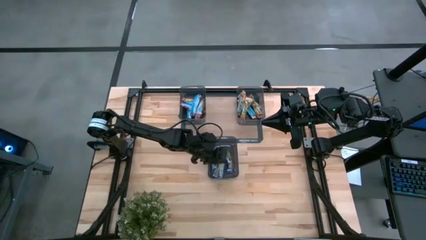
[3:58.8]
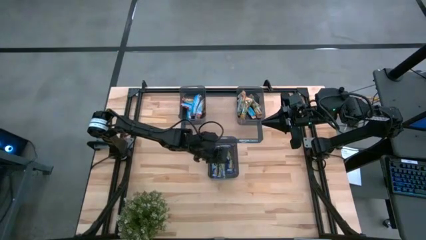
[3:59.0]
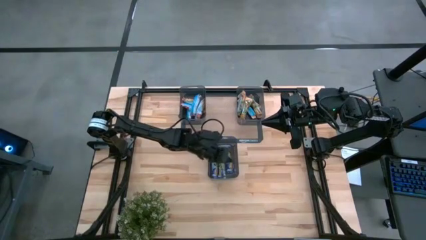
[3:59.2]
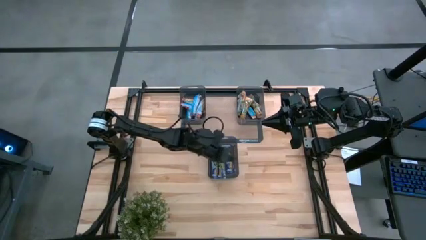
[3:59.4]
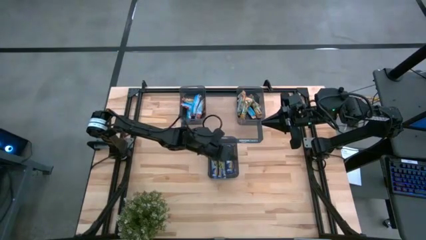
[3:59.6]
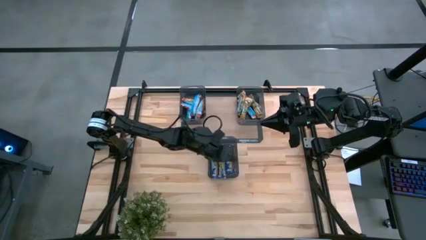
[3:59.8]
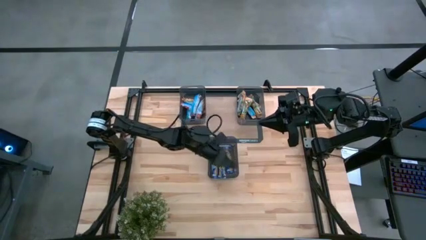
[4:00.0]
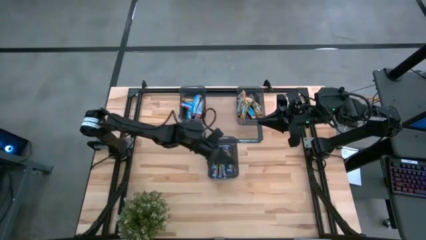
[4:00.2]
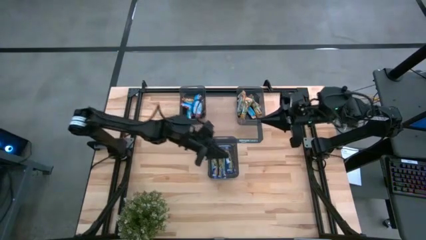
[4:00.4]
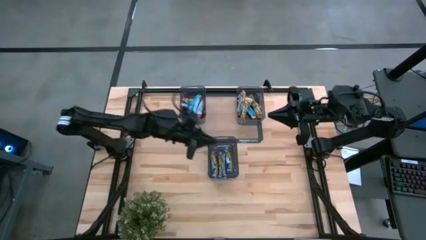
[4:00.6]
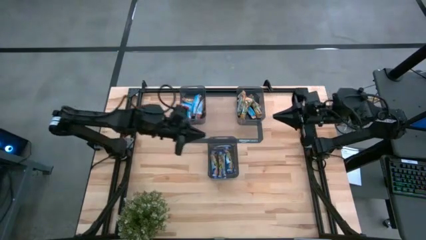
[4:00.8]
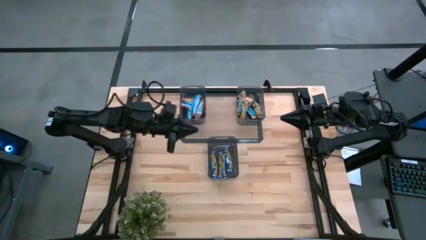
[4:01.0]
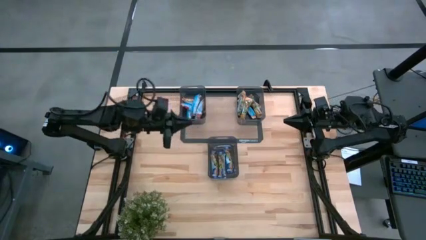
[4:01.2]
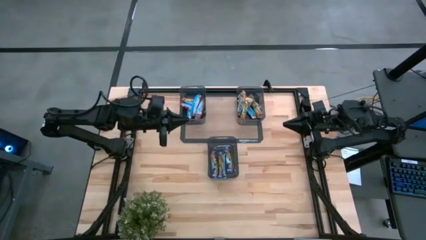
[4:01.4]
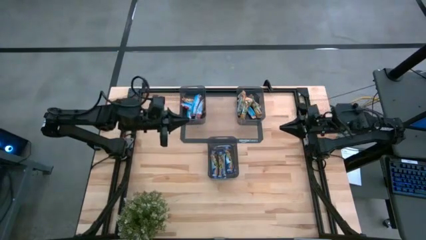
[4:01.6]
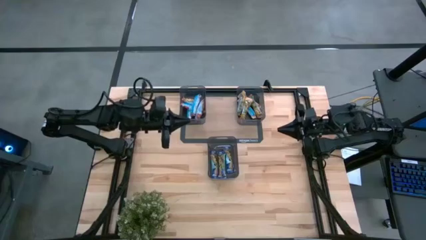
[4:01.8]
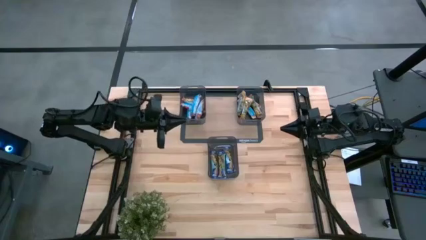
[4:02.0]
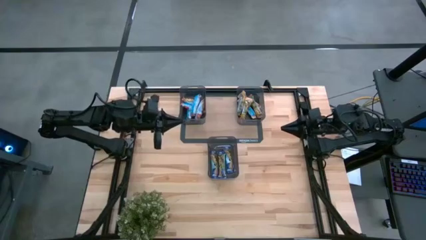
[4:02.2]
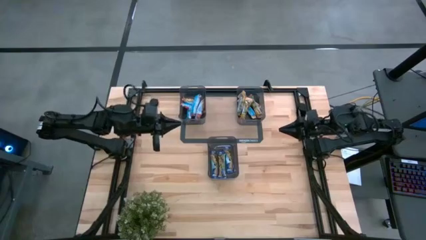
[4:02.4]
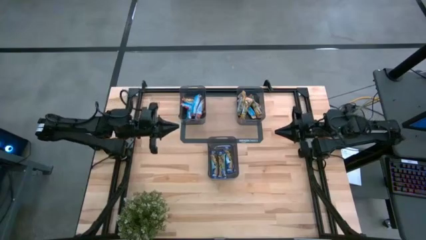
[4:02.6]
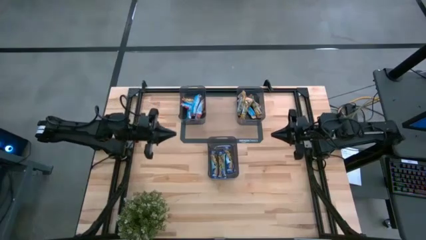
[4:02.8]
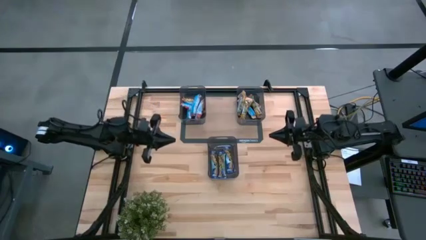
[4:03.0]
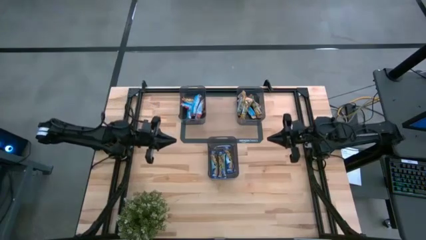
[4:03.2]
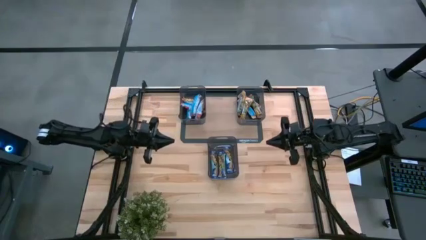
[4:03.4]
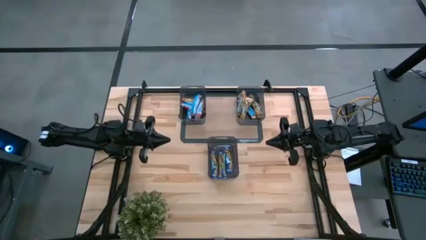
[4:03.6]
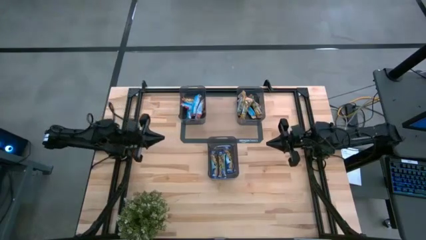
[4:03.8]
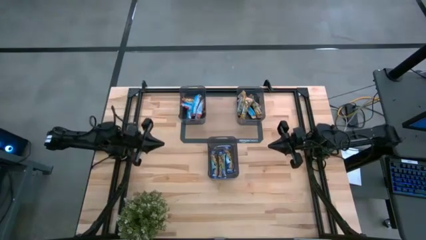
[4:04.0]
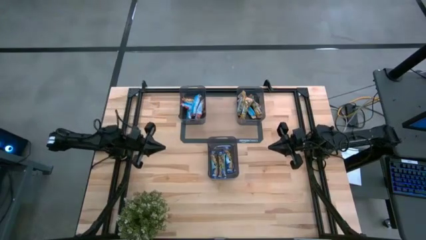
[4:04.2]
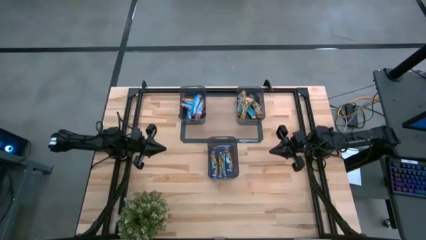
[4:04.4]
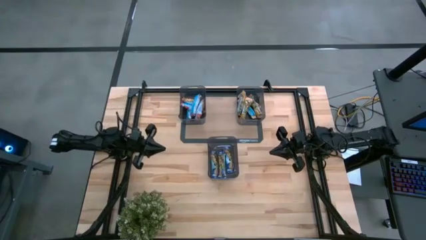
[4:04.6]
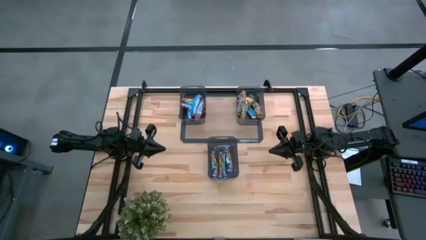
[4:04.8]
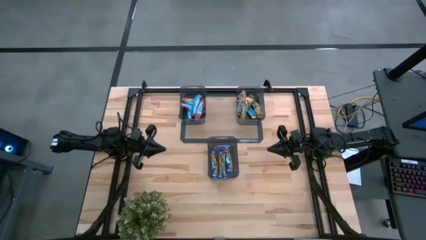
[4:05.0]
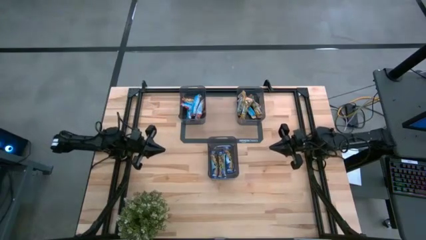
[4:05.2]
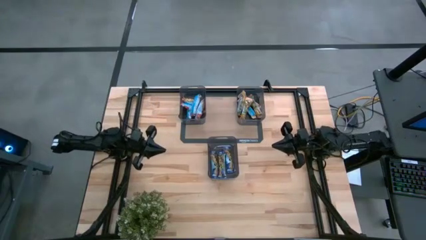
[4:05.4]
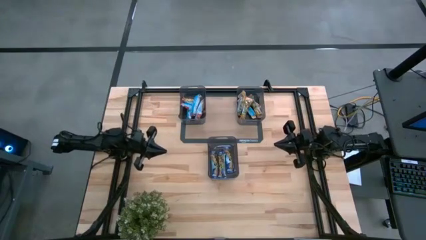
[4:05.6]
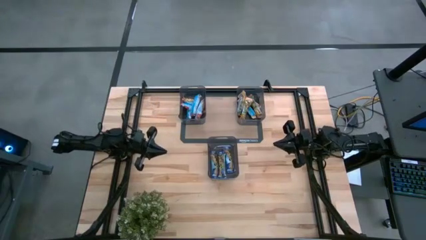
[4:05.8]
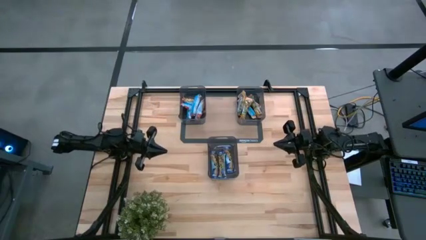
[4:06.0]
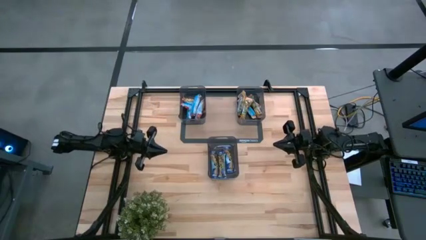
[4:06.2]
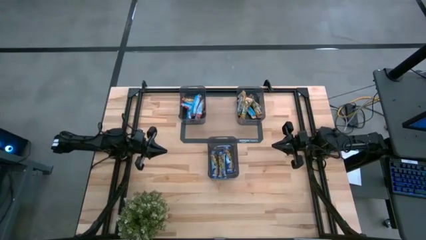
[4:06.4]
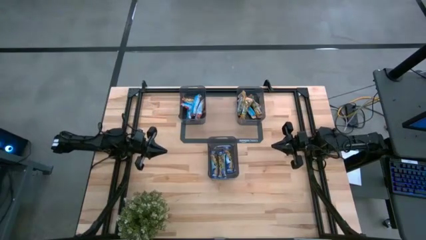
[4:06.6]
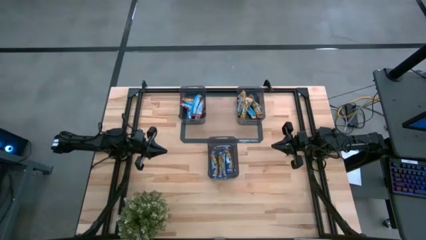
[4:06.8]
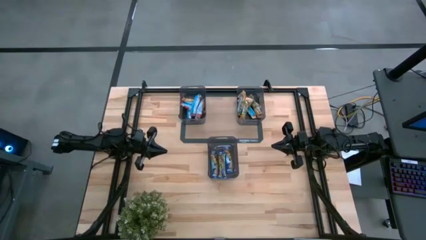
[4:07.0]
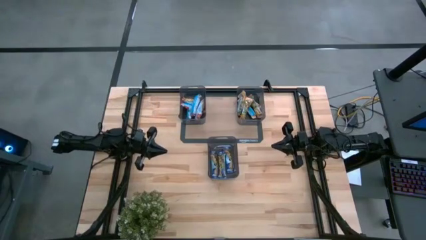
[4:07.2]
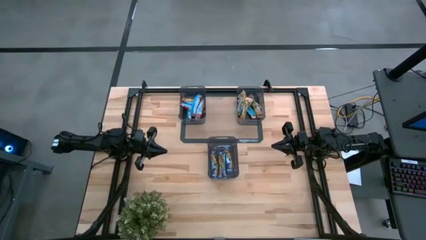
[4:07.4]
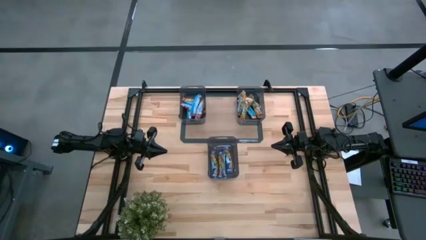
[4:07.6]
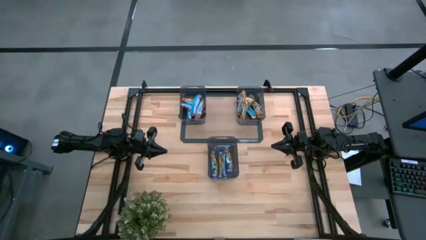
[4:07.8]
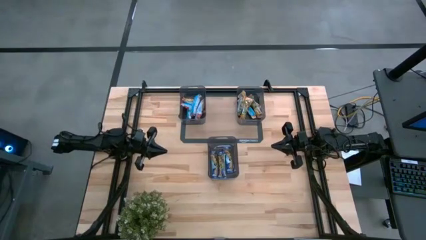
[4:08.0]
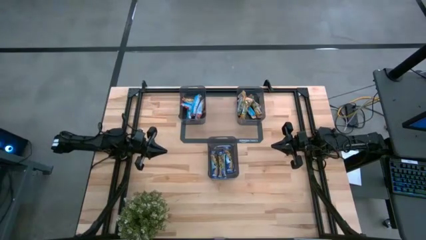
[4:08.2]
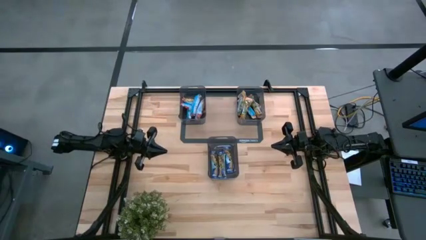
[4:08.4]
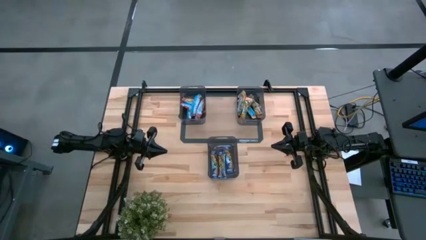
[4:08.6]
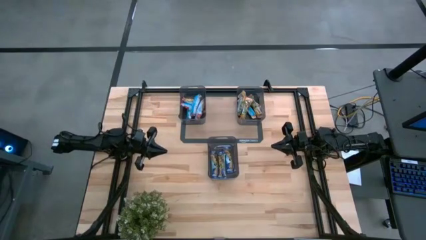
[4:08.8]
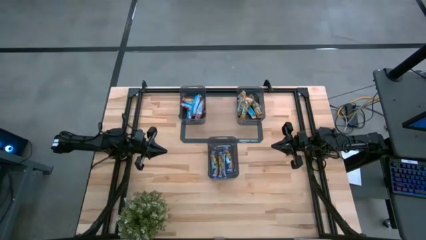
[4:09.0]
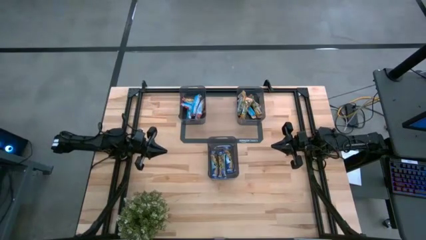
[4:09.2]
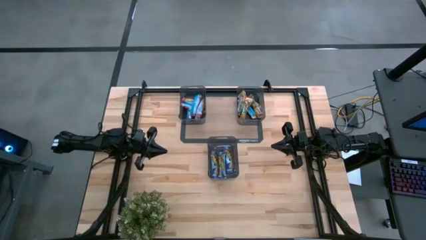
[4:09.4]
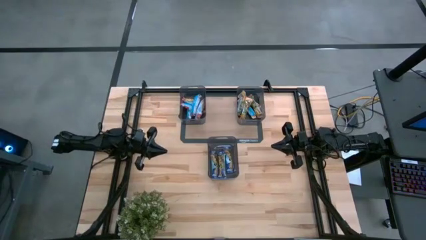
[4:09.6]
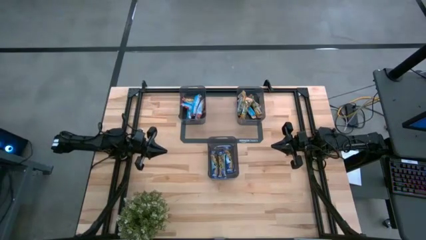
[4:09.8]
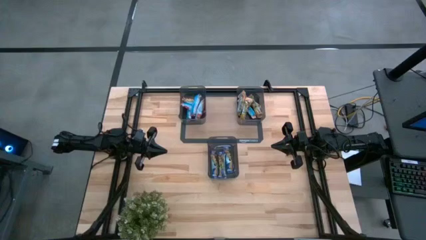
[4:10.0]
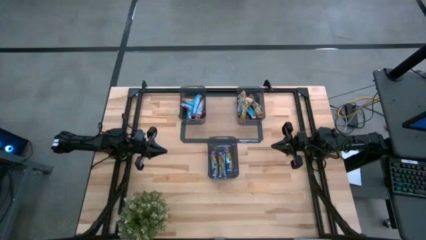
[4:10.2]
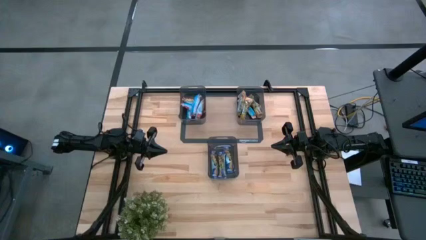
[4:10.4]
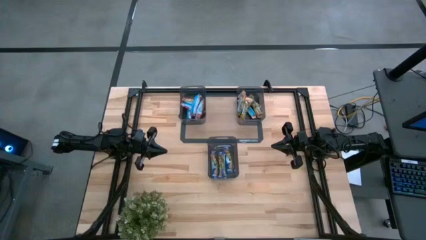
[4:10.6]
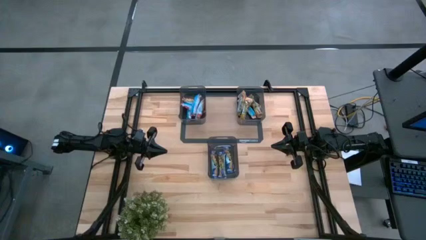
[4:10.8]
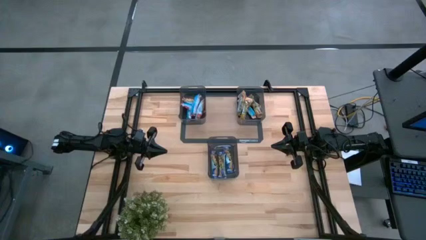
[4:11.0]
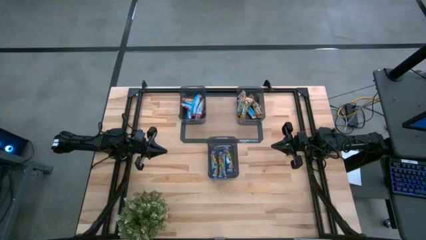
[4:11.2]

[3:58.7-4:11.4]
Task: Pick and place Granola Bars by type
Return to Home Position

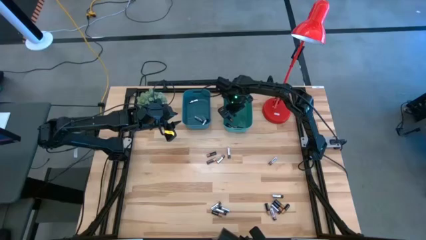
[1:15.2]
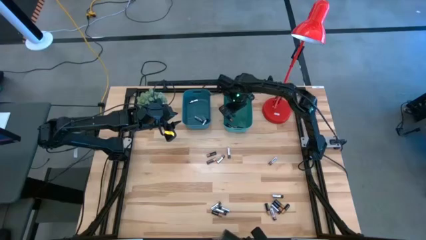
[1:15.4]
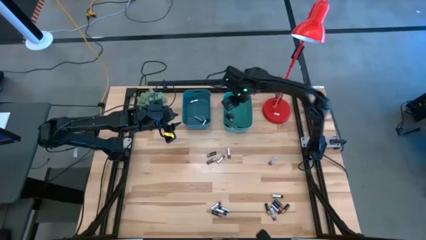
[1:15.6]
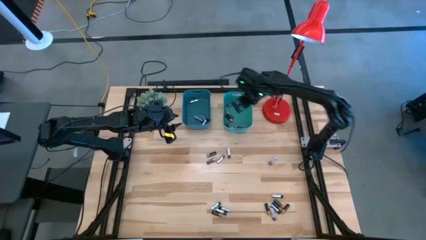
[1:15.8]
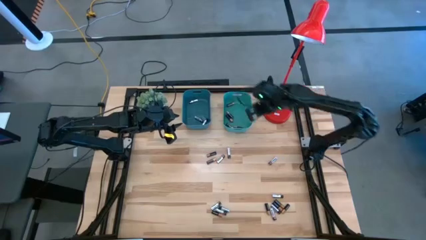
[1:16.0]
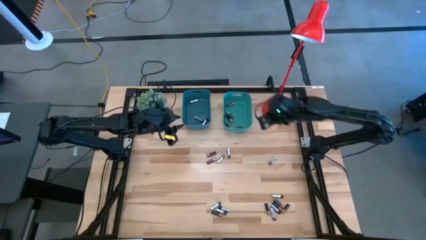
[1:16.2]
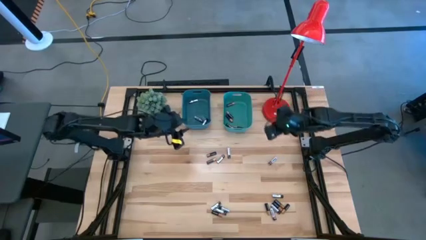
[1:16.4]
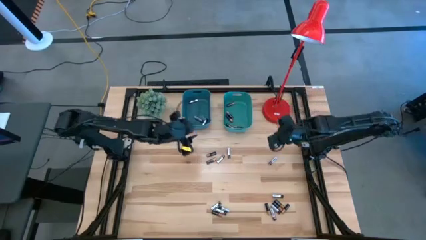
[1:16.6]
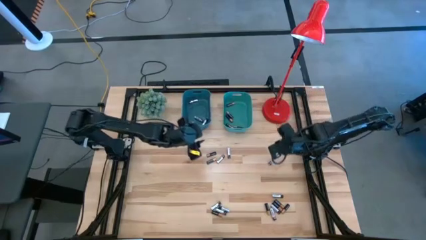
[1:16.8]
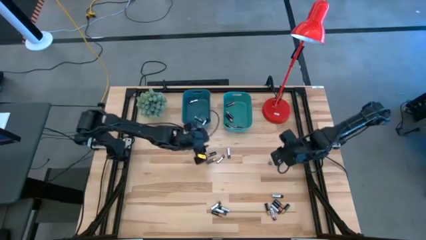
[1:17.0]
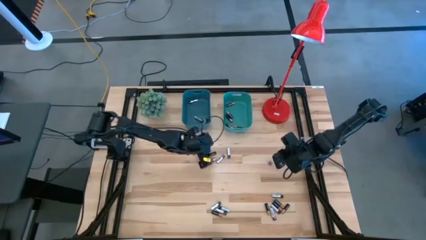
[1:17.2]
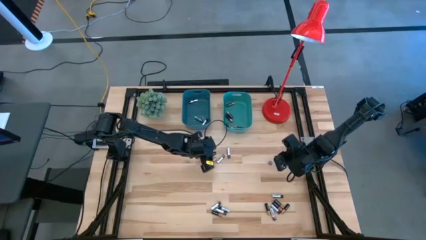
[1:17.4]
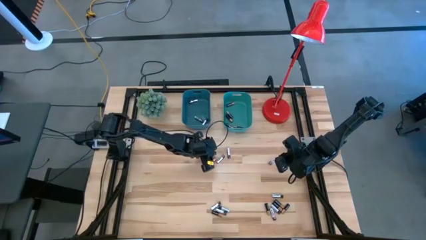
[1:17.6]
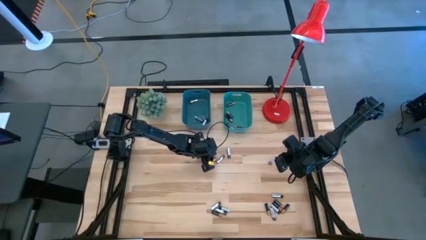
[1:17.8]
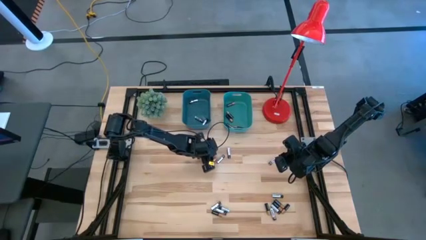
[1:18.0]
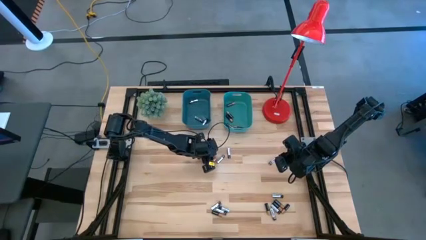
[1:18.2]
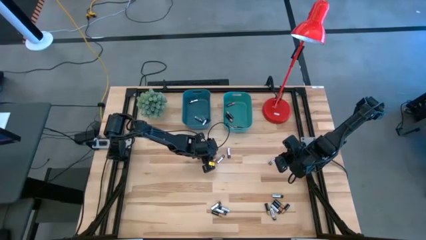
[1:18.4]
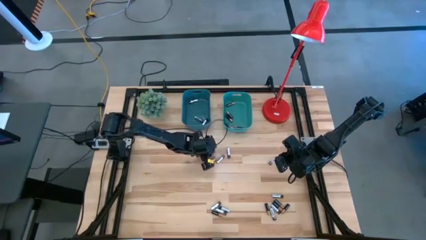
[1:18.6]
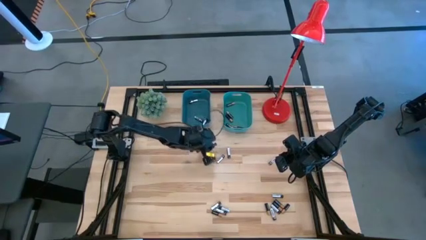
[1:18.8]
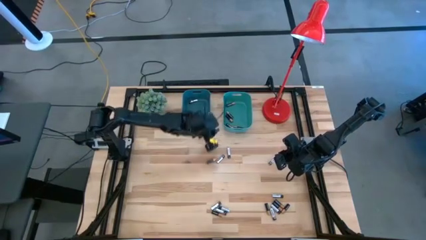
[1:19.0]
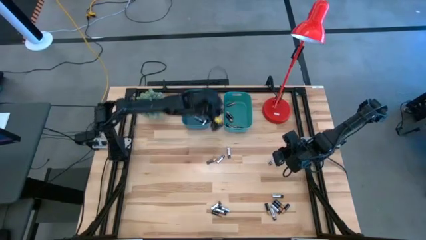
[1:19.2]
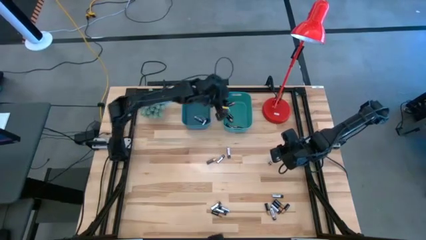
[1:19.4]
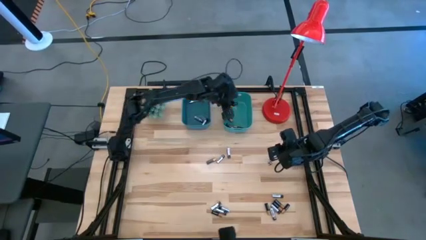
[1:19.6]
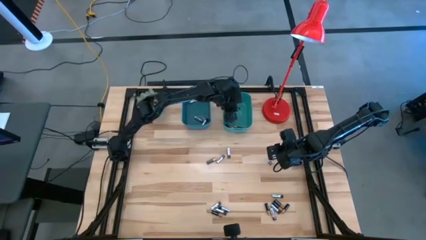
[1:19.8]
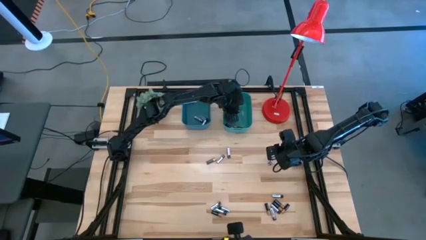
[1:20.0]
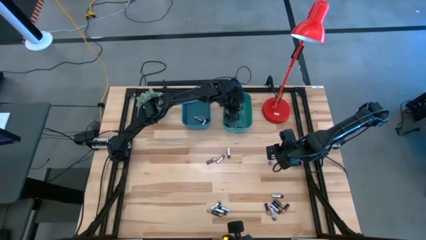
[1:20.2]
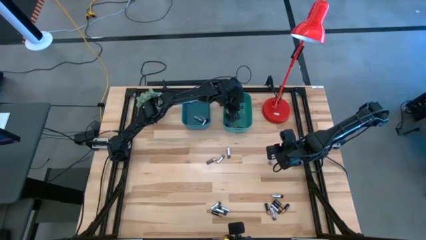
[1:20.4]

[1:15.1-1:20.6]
Task: Sort batteries
Put the black battery into the green bin
